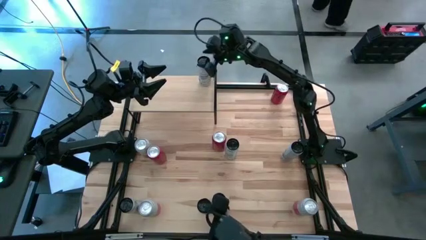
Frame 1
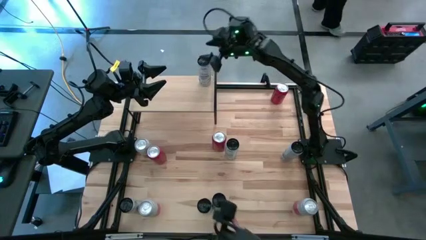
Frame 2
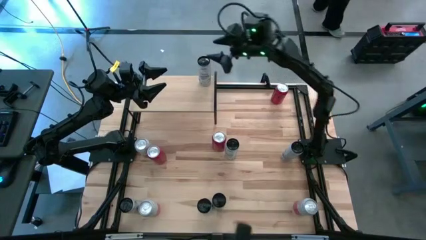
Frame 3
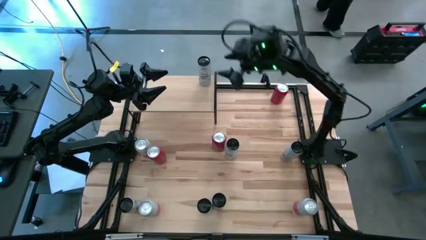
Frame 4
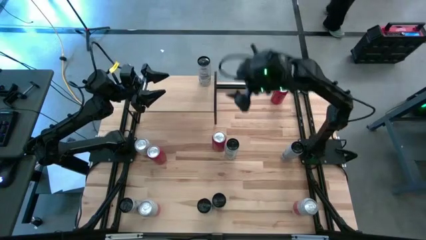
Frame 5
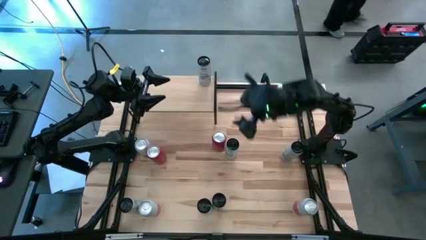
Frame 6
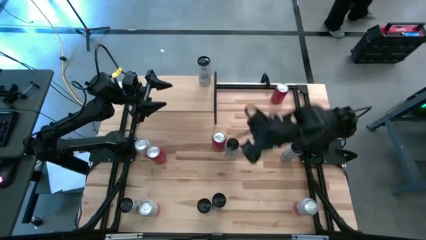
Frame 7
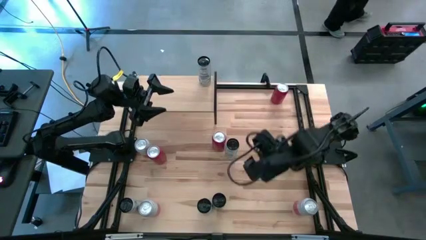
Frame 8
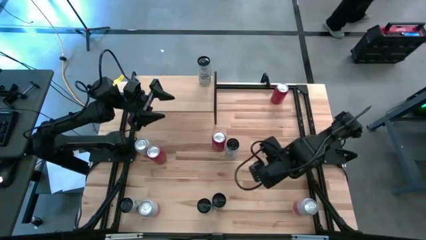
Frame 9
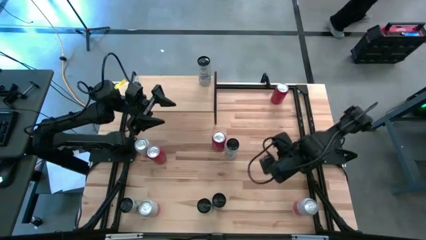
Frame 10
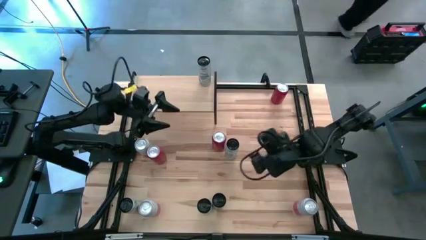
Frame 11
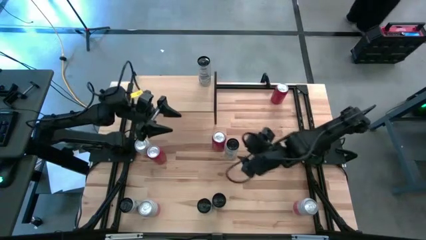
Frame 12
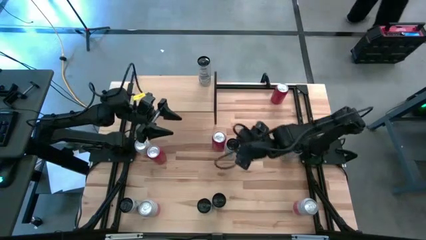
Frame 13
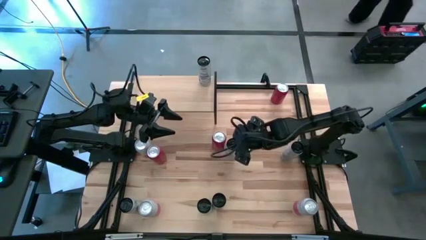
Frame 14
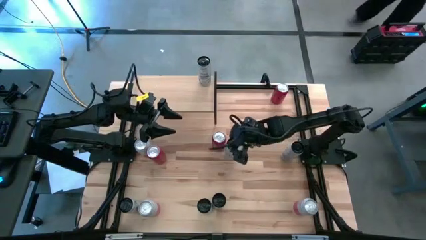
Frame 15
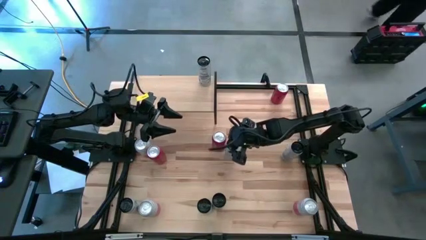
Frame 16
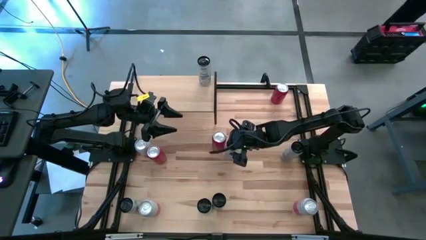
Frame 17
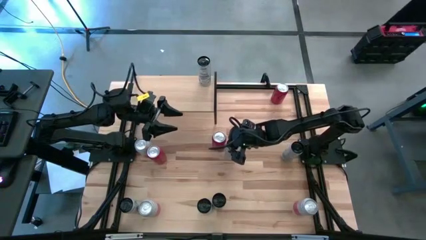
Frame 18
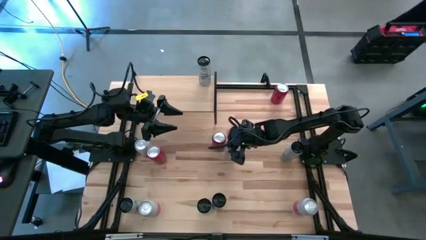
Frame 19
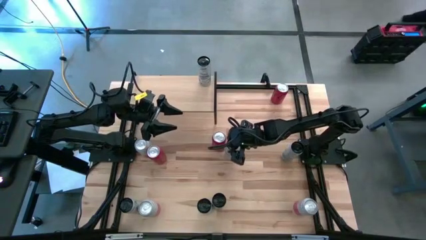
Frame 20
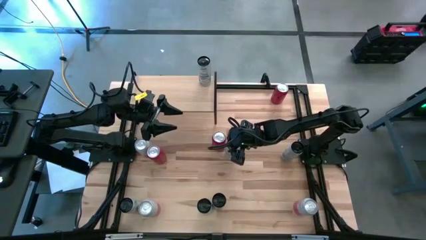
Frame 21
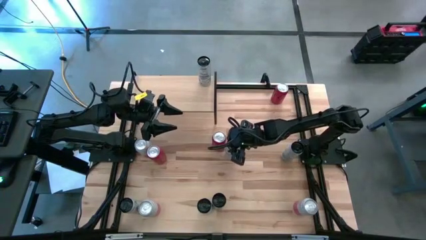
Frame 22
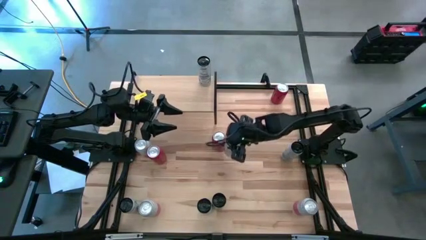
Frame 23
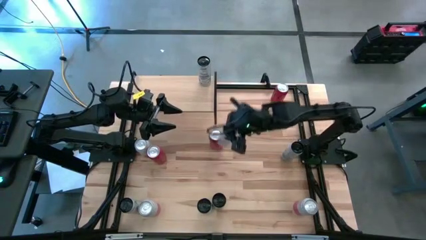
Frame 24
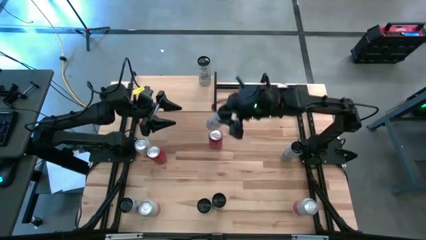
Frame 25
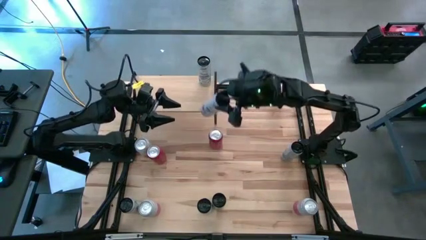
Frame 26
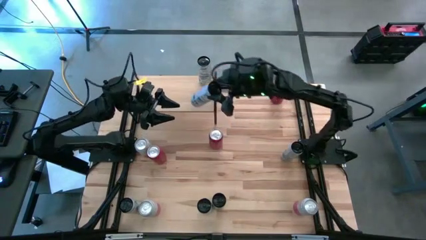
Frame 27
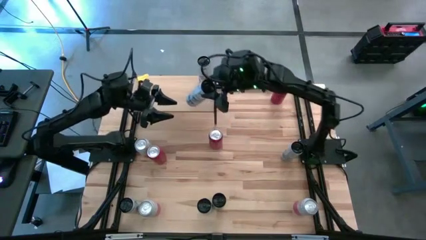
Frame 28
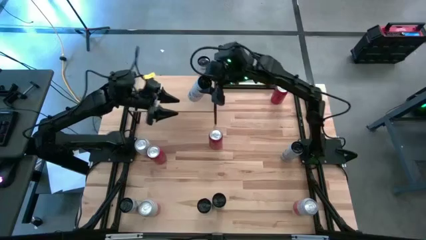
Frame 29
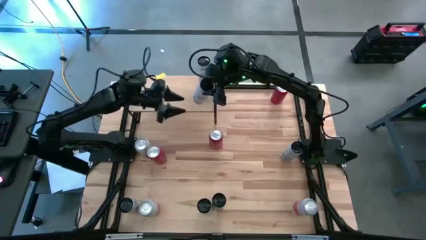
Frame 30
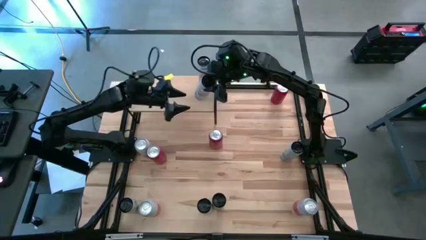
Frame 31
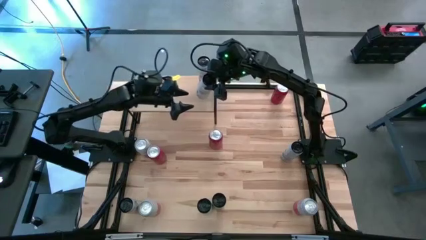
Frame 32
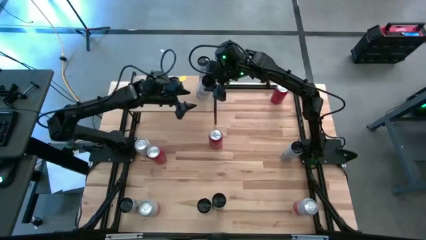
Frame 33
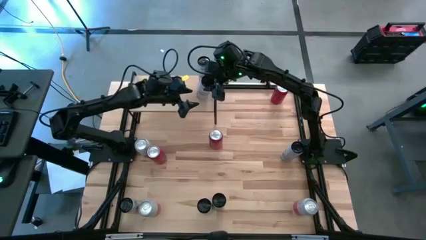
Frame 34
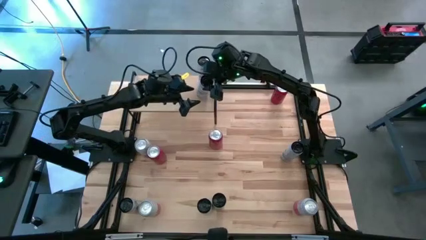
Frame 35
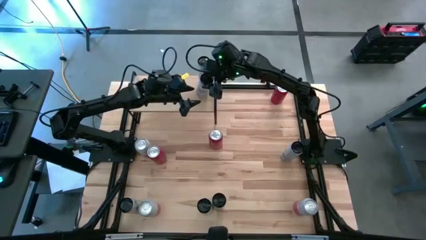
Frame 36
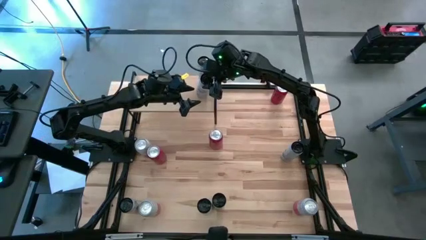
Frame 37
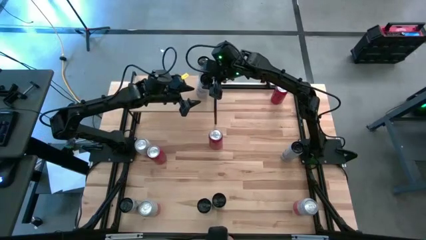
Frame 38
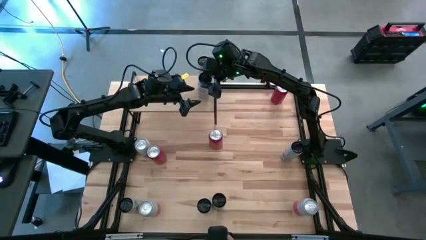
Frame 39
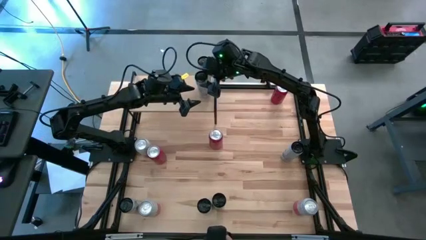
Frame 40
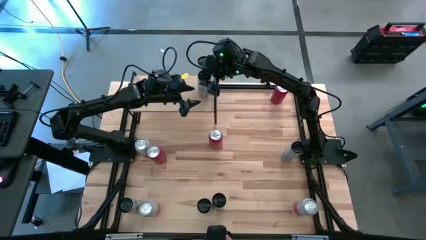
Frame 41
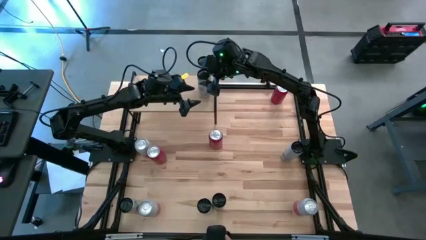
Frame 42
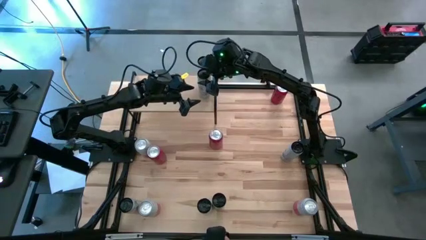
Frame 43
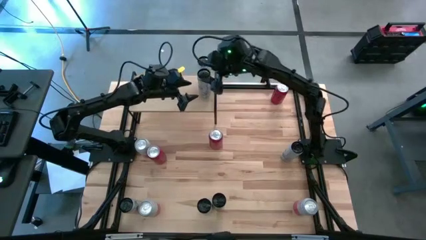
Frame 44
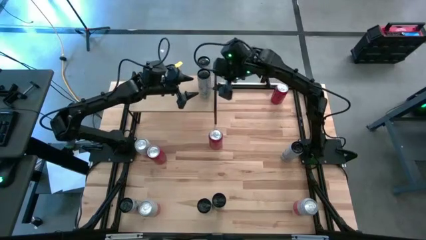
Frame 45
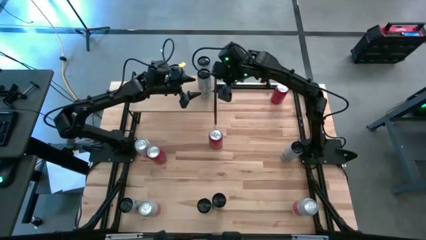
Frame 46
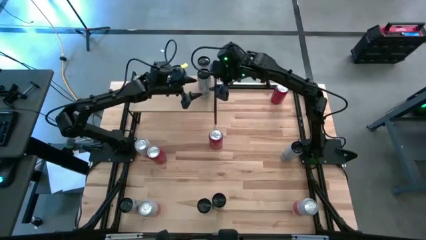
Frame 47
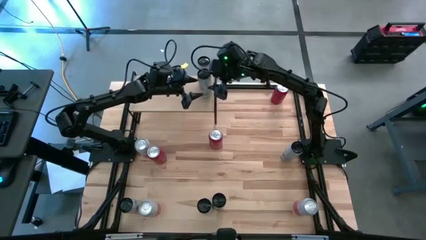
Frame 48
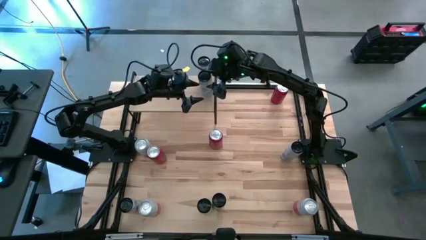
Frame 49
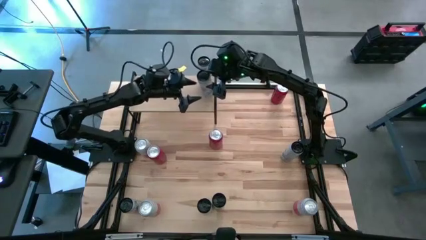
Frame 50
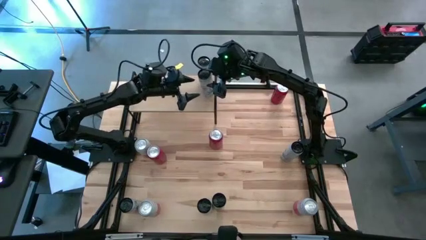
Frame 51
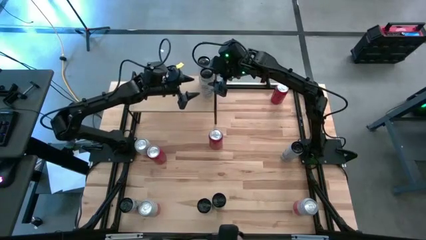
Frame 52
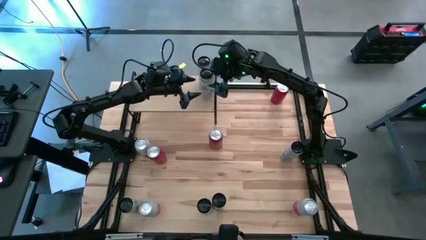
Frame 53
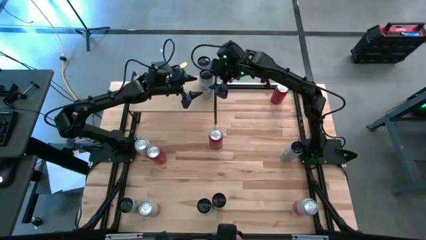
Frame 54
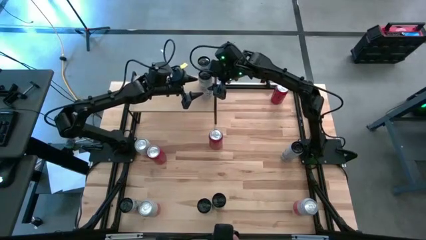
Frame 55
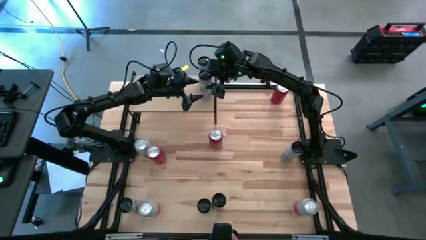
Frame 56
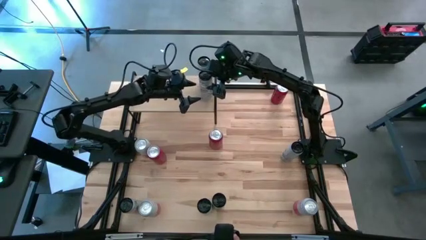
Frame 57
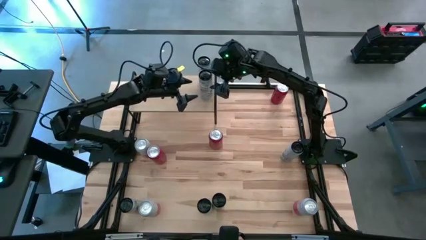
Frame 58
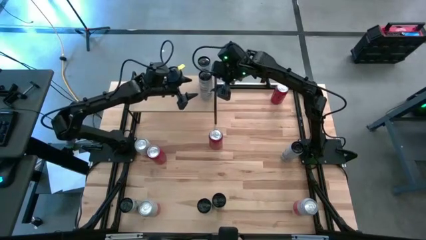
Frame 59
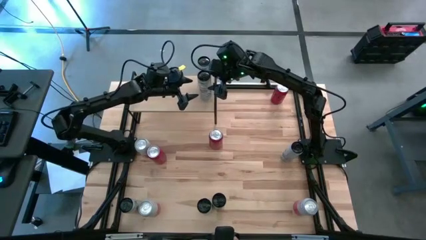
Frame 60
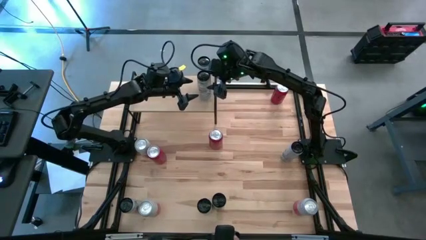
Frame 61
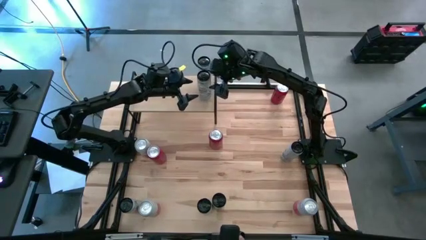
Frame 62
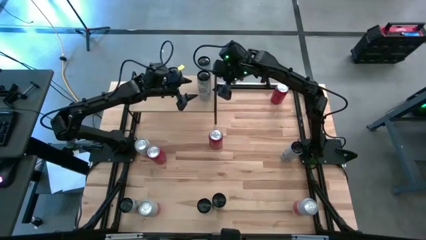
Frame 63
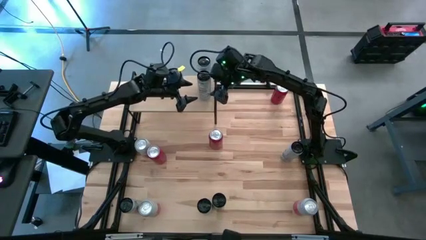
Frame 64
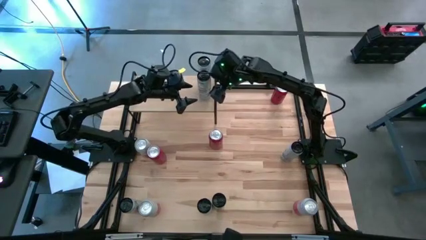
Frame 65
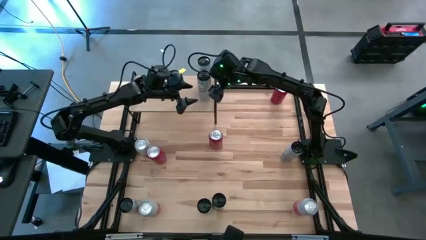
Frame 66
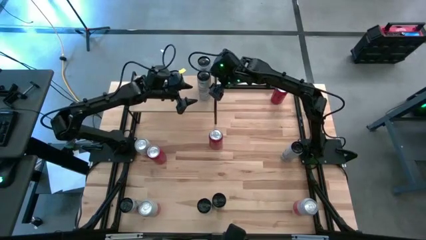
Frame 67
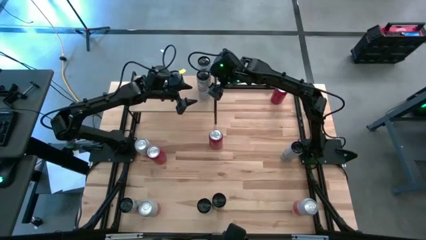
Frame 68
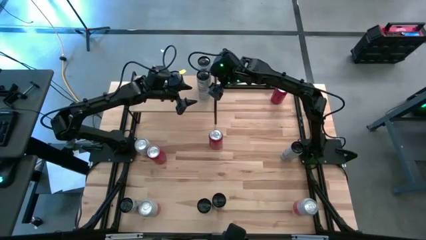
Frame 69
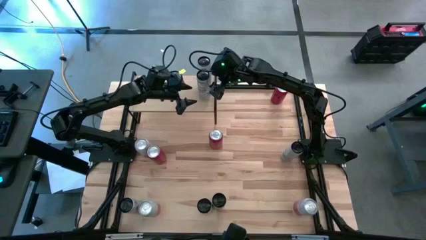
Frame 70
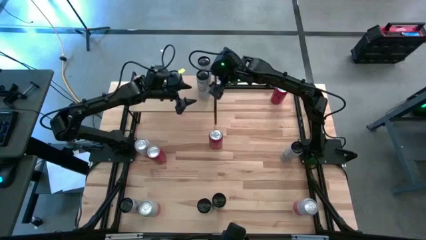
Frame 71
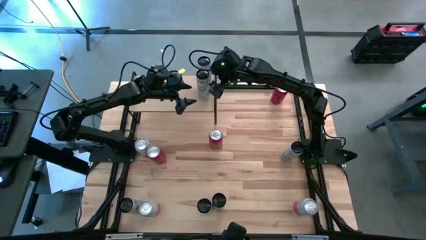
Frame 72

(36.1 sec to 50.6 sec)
Task: Place canned beverage on shelf
Put the left blue soda can on the shelf aligned with the other blue soda can
